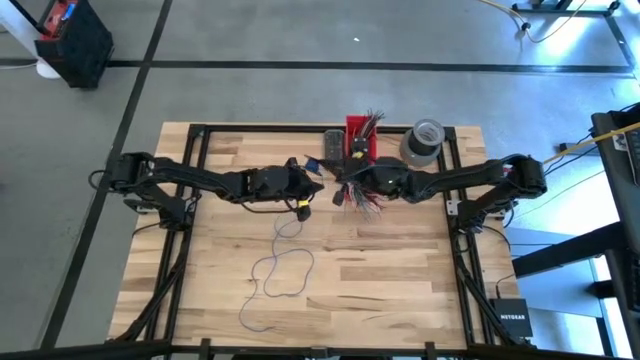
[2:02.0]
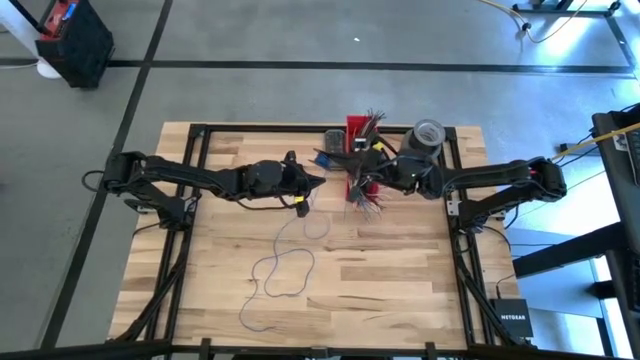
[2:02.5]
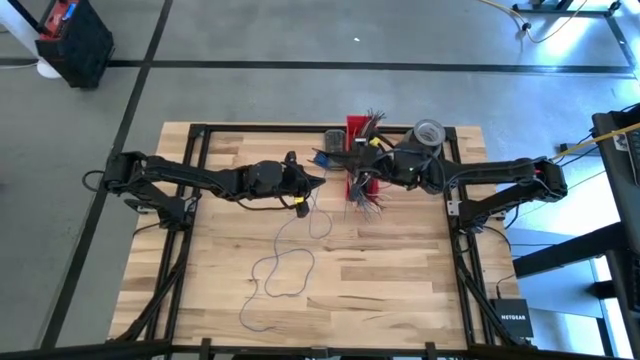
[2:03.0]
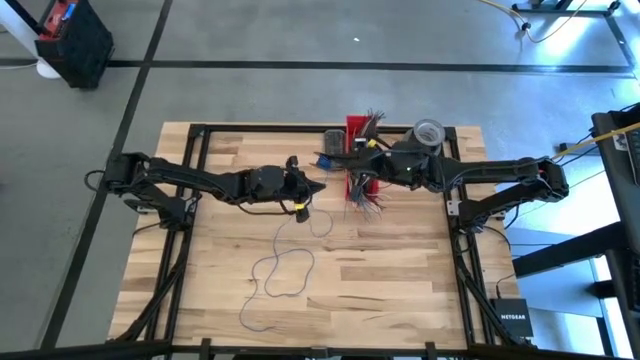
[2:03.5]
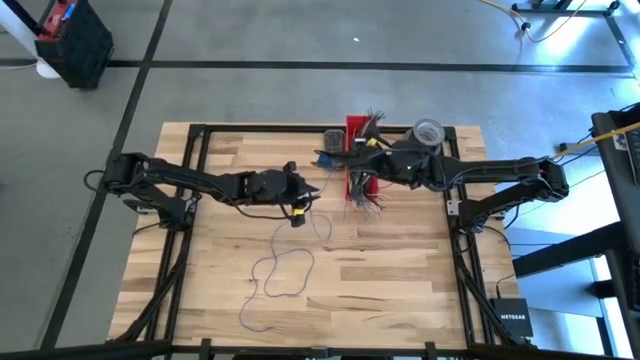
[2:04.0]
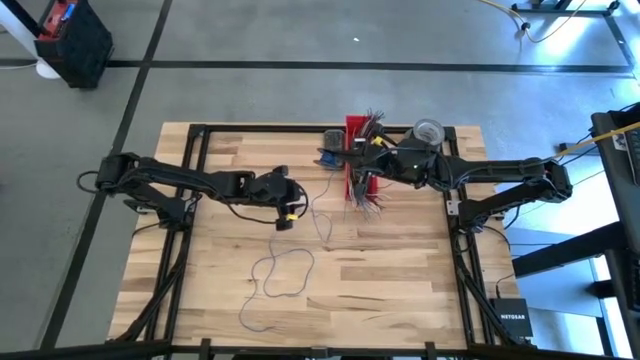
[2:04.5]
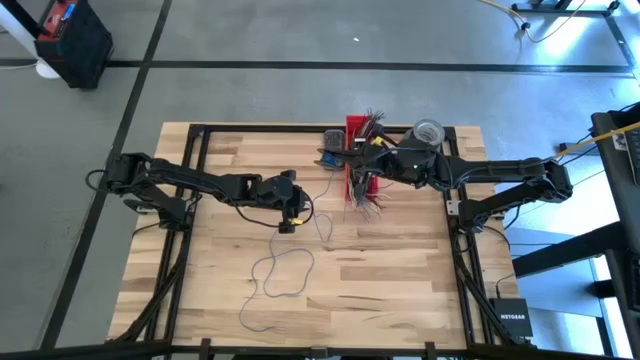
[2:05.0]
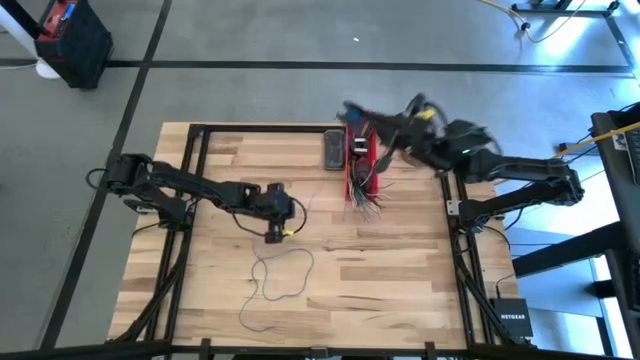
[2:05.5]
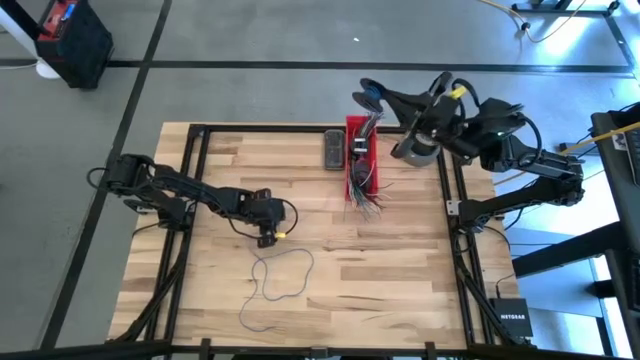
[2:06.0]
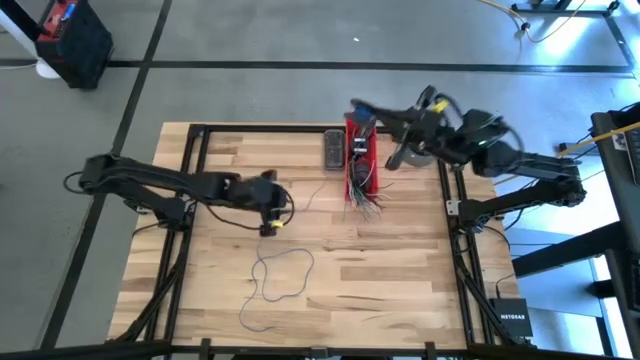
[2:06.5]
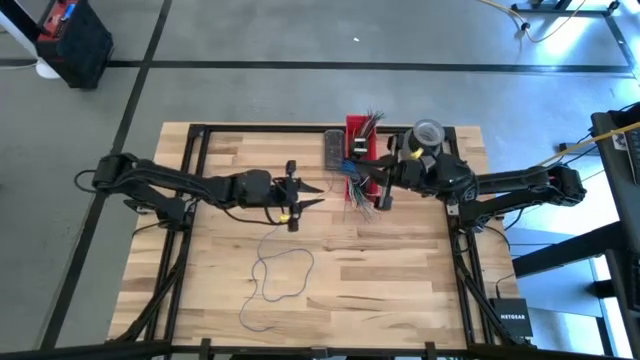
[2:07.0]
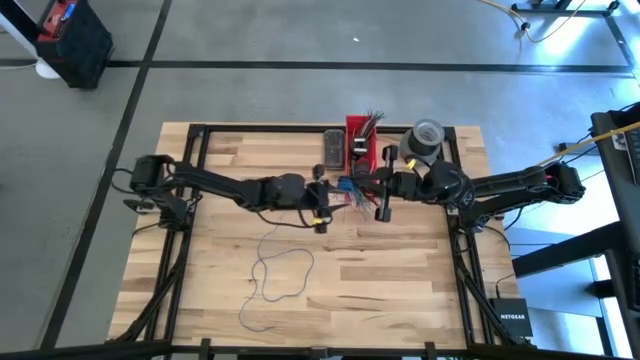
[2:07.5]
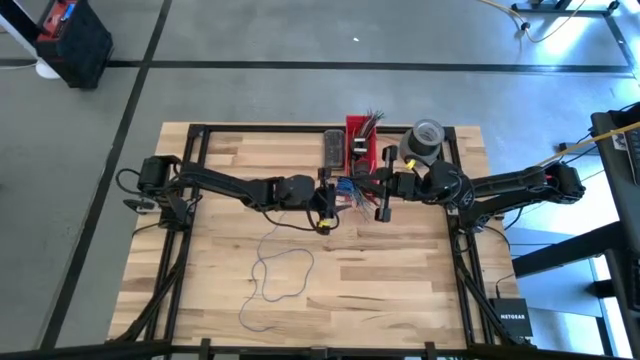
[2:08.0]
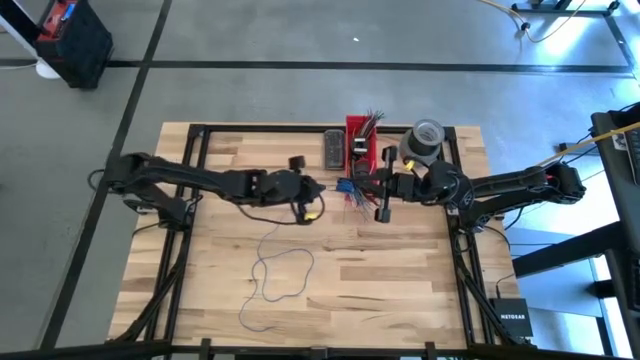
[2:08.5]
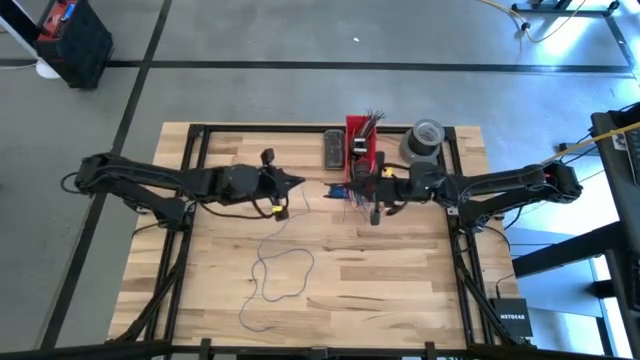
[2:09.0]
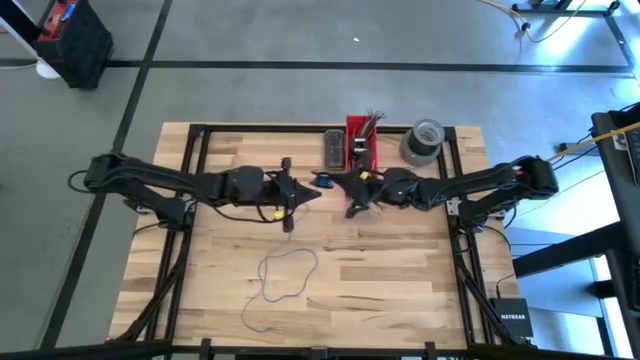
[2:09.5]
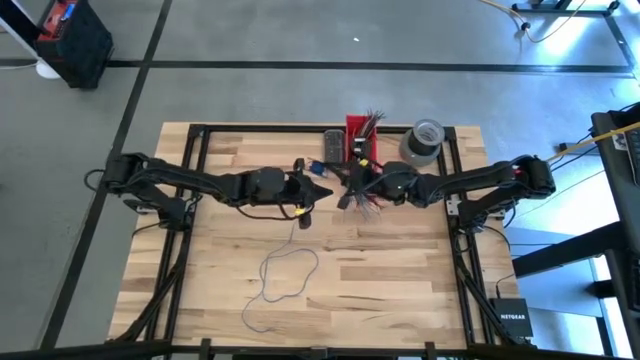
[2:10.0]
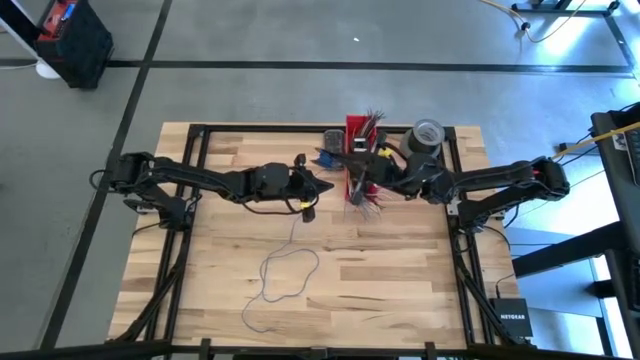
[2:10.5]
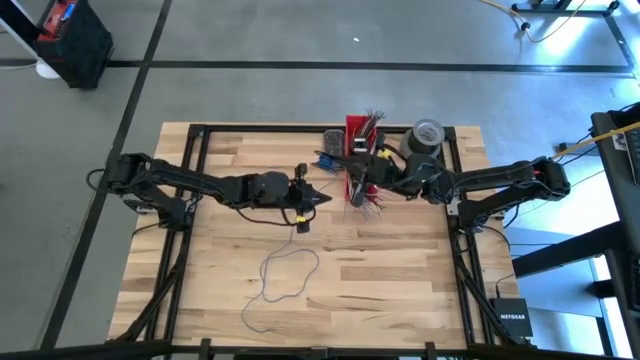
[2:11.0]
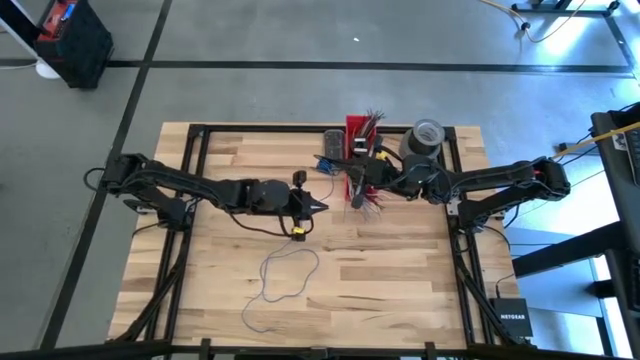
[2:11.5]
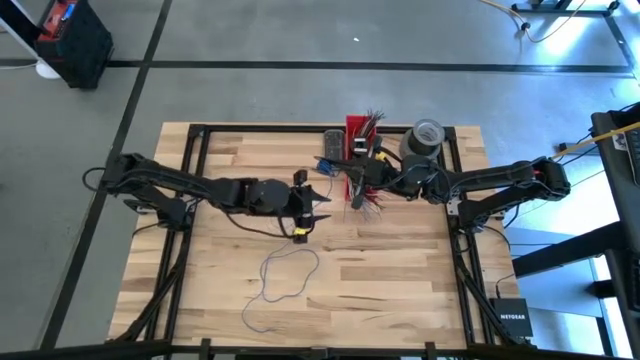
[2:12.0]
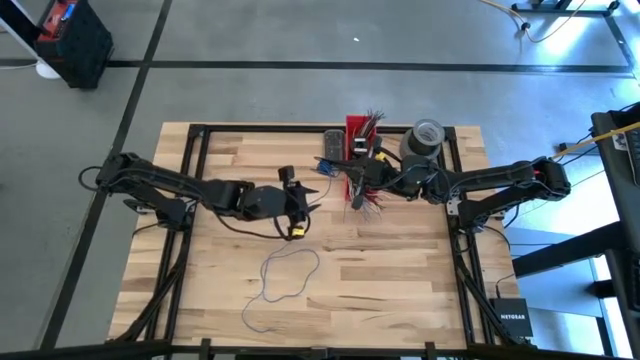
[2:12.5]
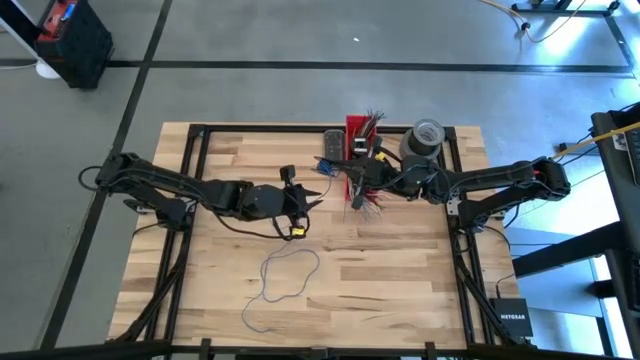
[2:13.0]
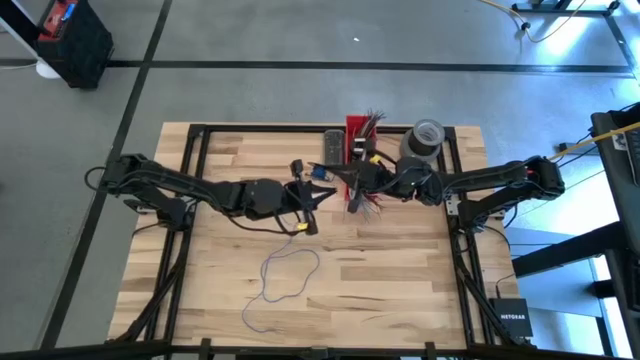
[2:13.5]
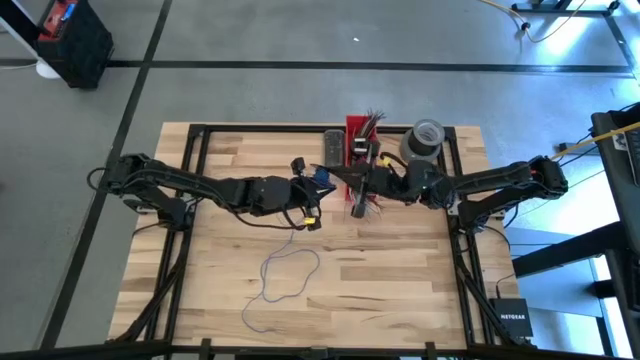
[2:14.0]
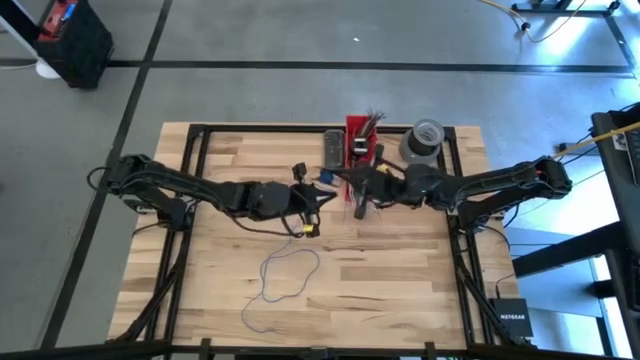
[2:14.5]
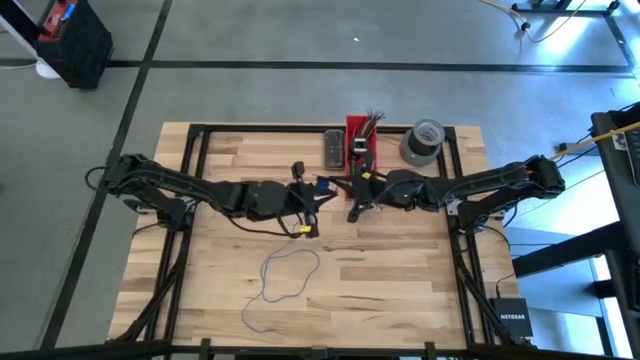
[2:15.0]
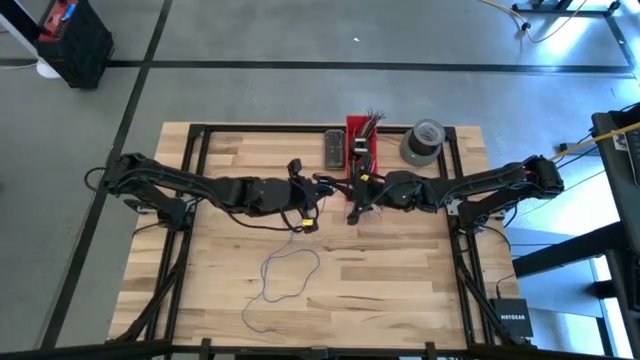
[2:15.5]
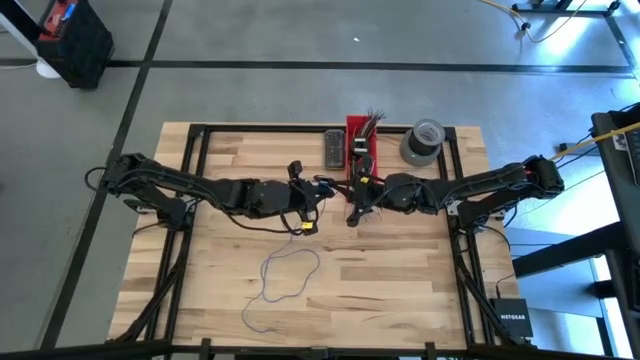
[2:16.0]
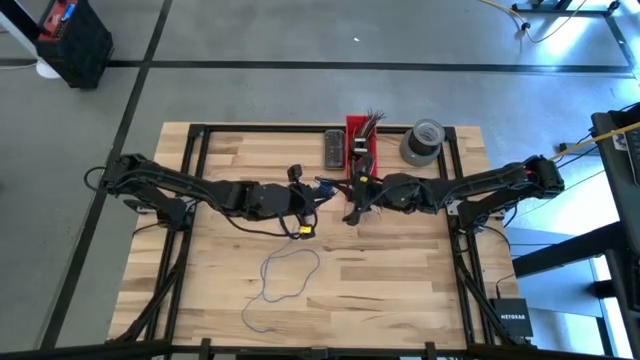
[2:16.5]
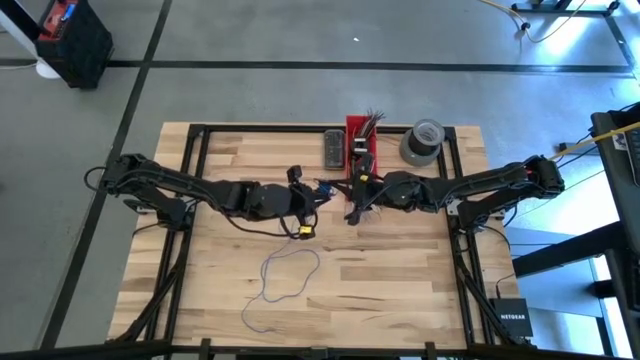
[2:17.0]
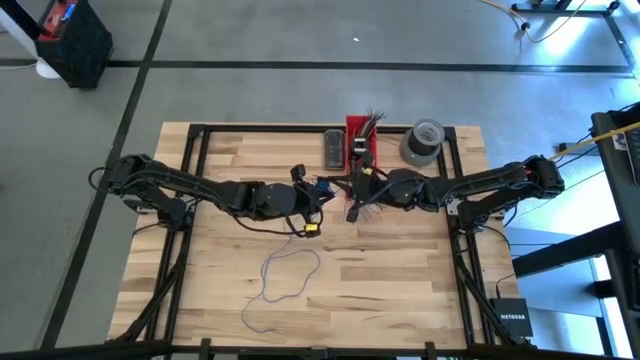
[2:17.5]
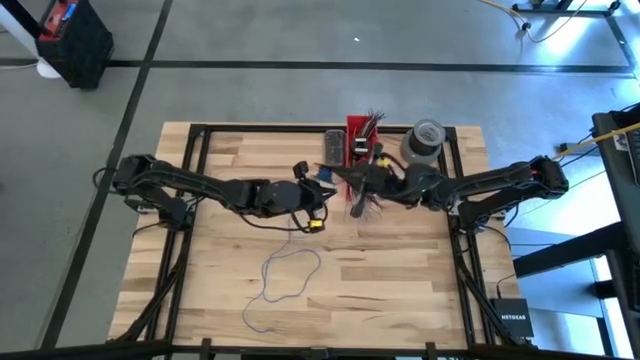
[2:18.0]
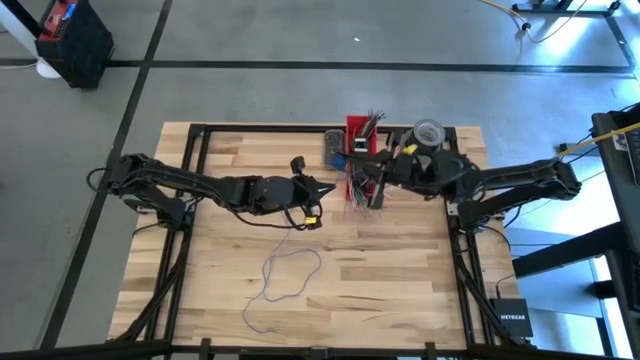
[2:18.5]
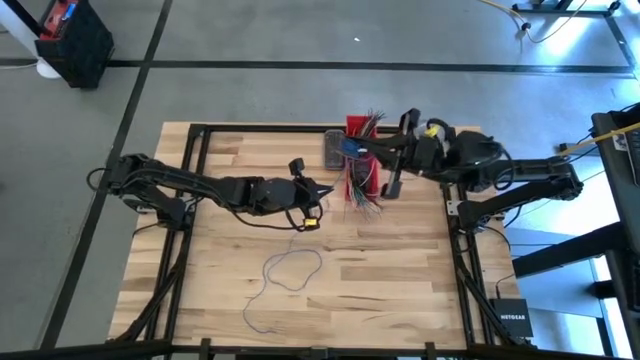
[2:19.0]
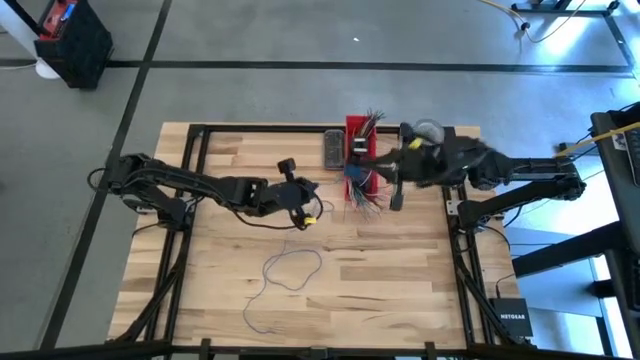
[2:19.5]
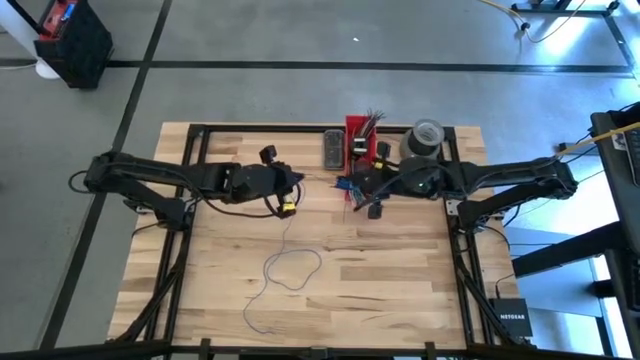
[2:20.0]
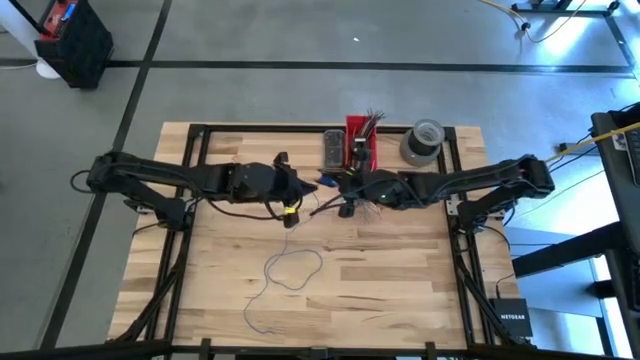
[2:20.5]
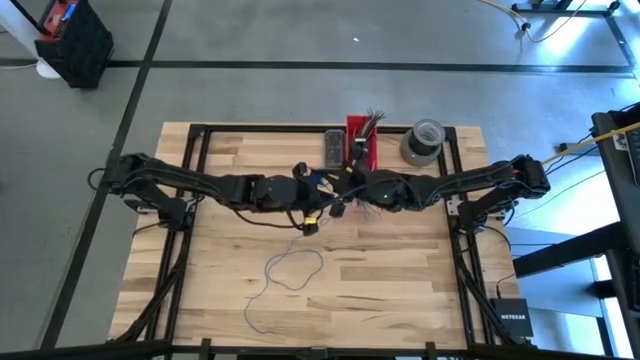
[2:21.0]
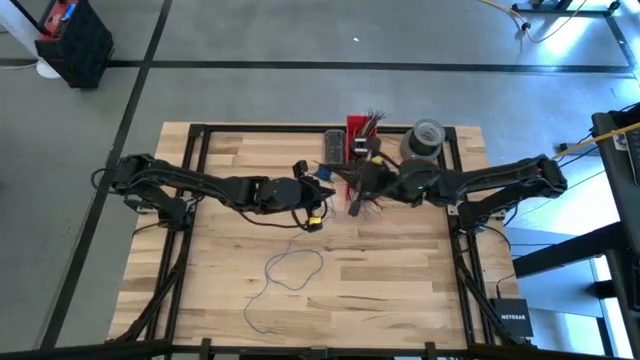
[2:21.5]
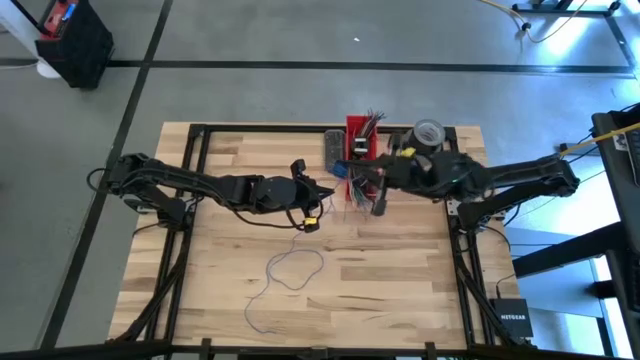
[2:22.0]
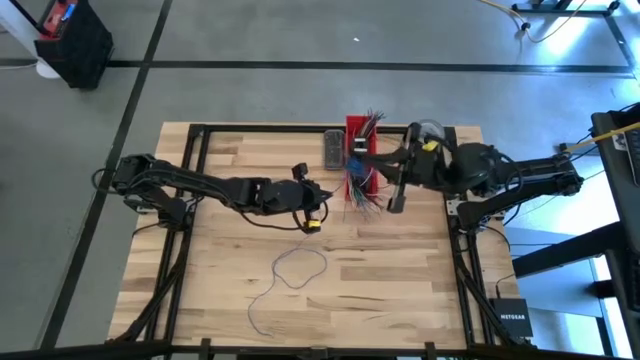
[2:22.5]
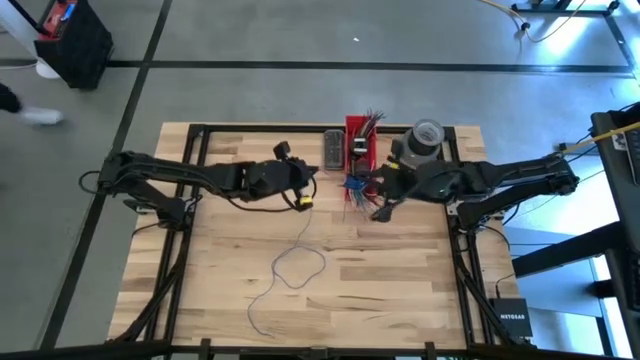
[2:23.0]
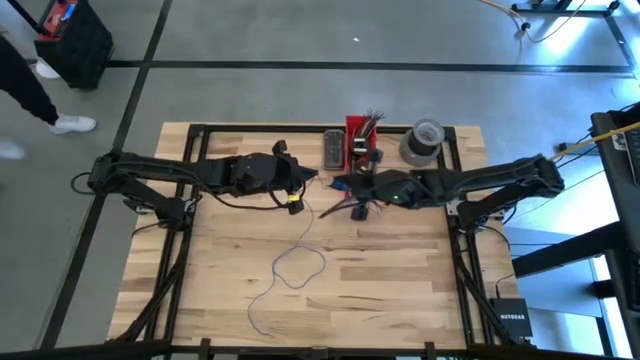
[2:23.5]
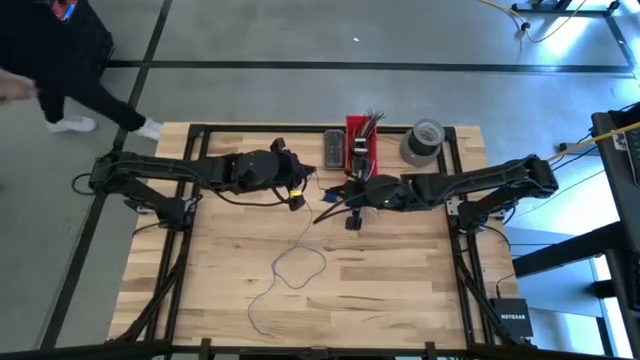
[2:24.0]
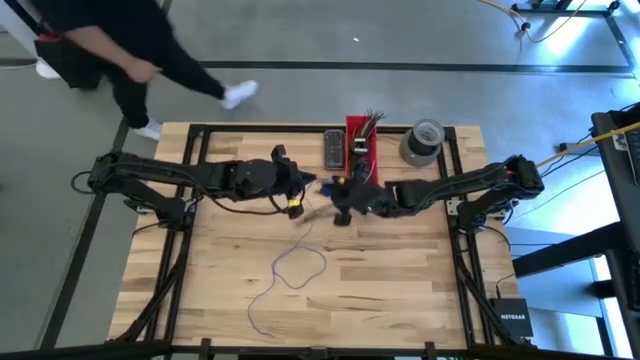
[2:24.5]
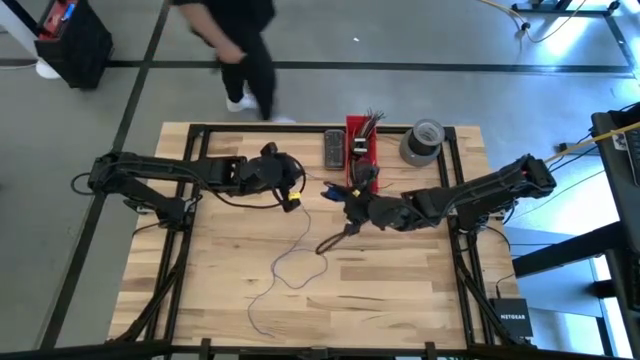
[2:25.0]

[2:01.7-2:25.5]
Task: Coil cords
Coil the blue wire into the black spool
